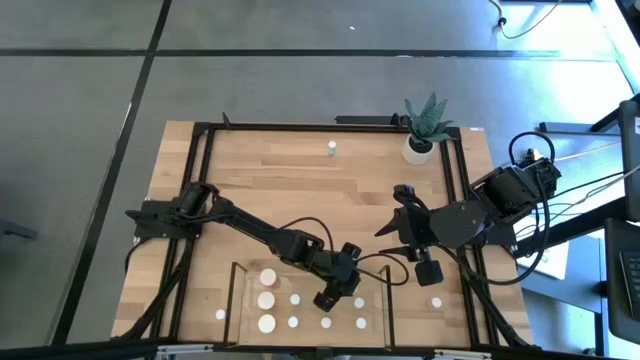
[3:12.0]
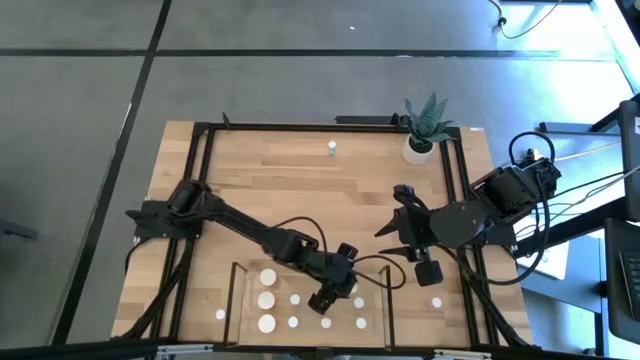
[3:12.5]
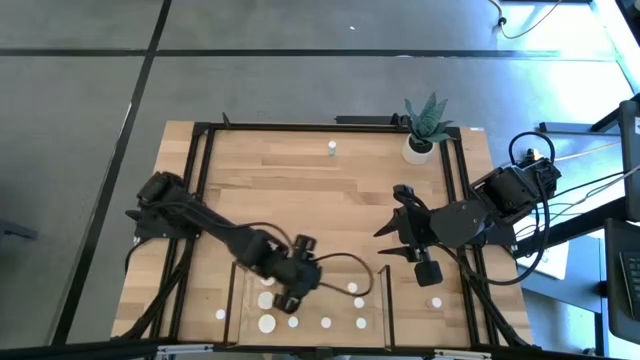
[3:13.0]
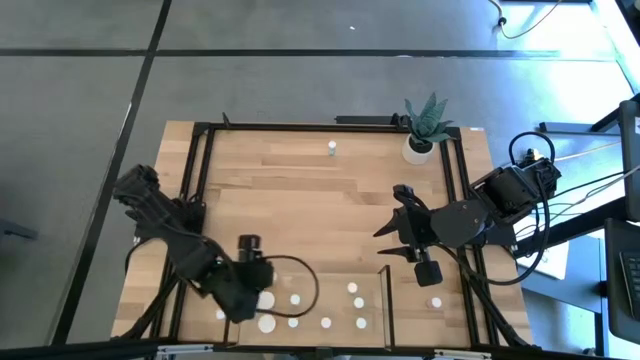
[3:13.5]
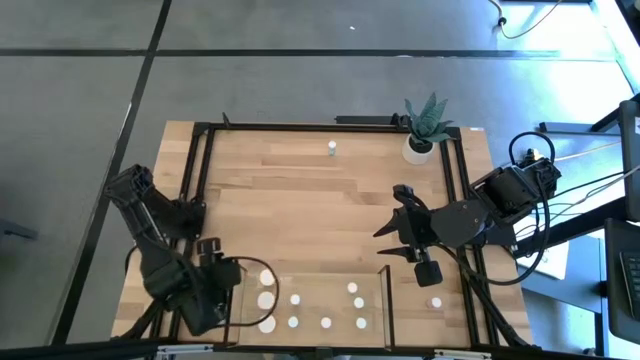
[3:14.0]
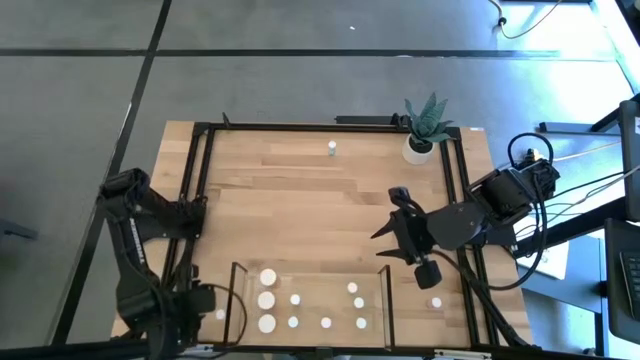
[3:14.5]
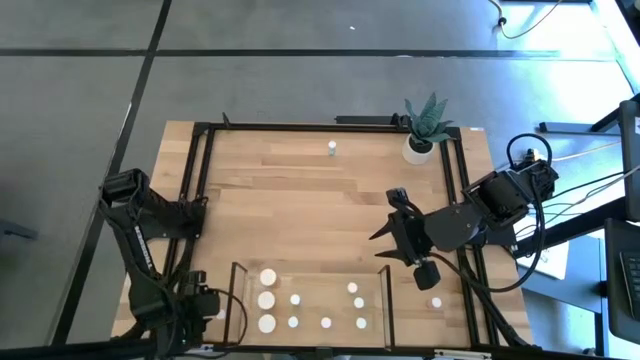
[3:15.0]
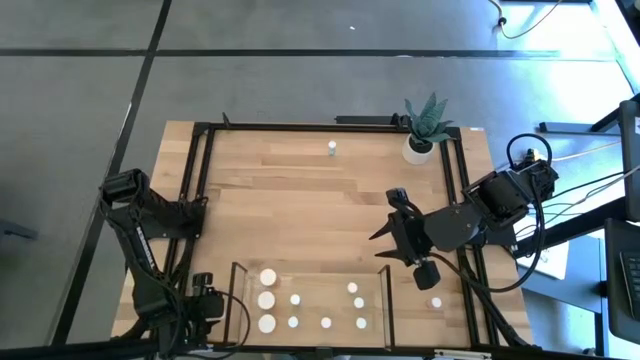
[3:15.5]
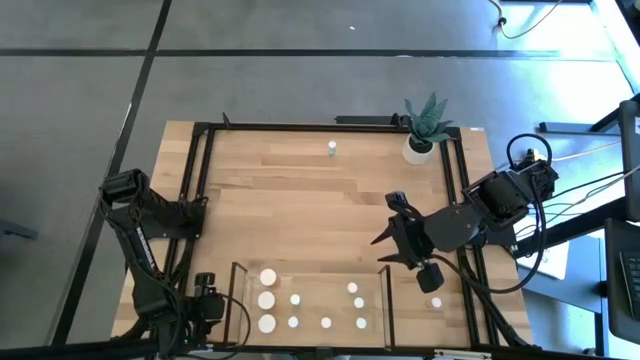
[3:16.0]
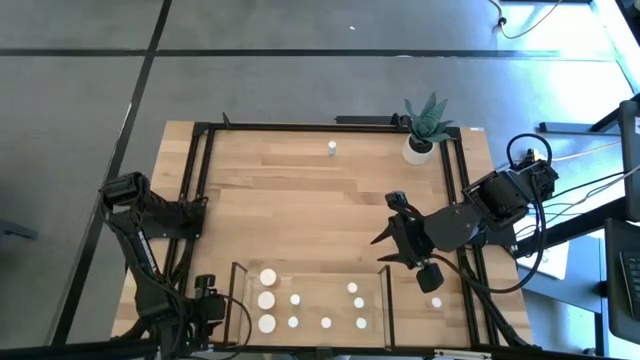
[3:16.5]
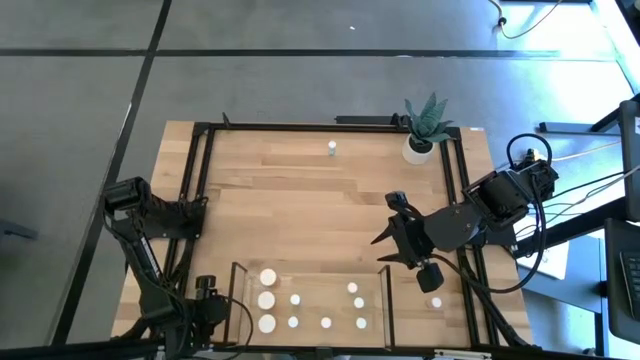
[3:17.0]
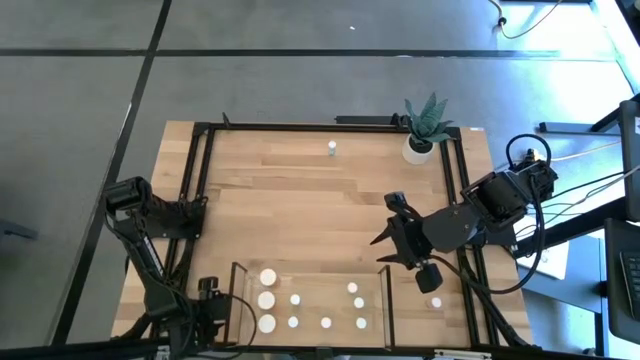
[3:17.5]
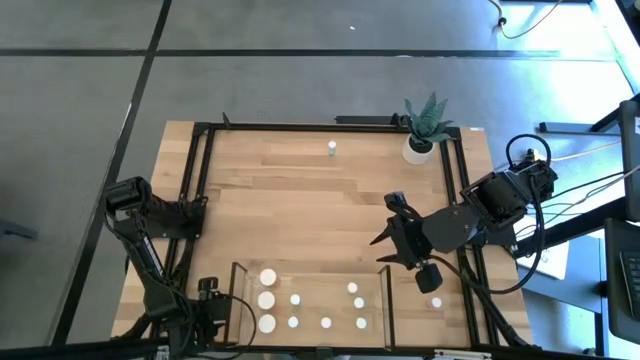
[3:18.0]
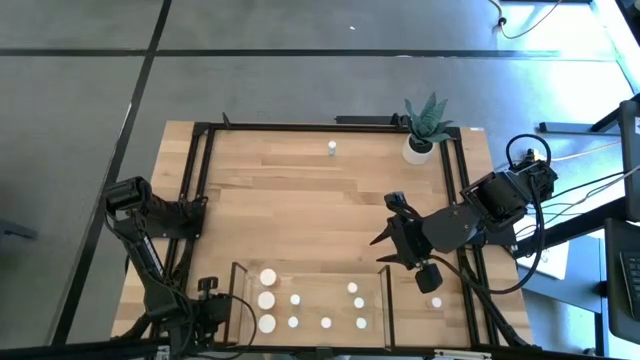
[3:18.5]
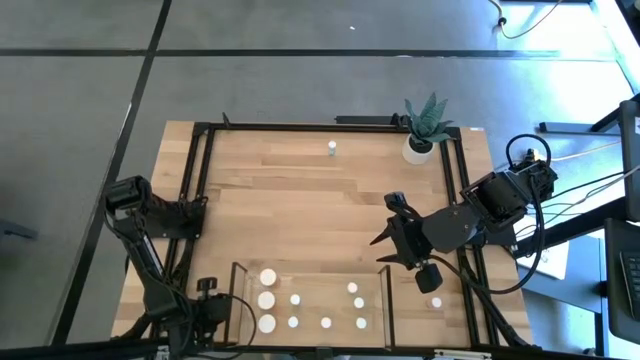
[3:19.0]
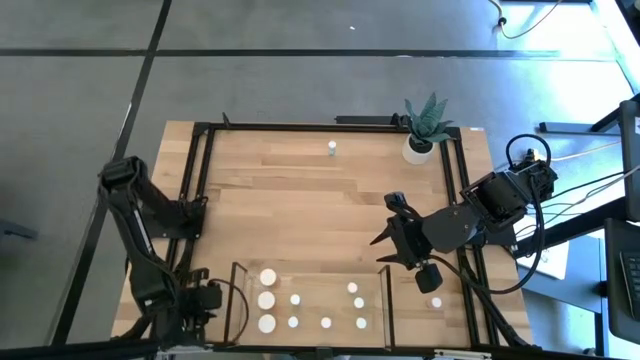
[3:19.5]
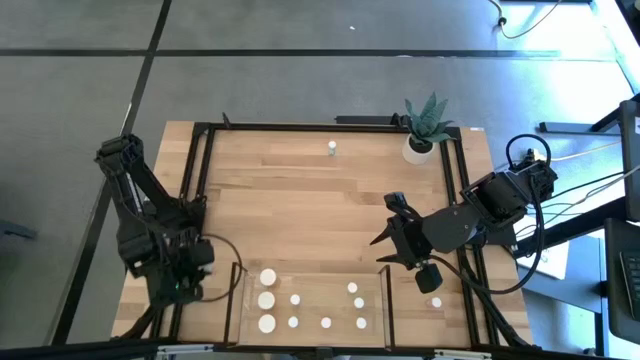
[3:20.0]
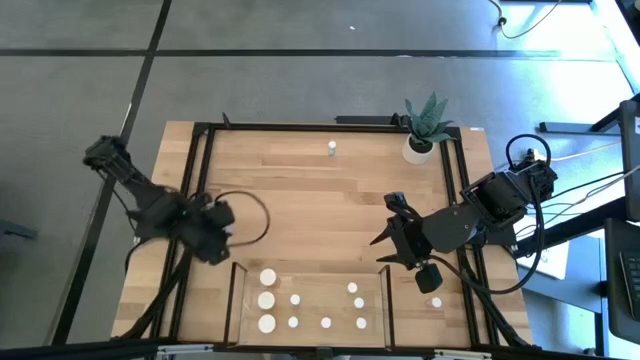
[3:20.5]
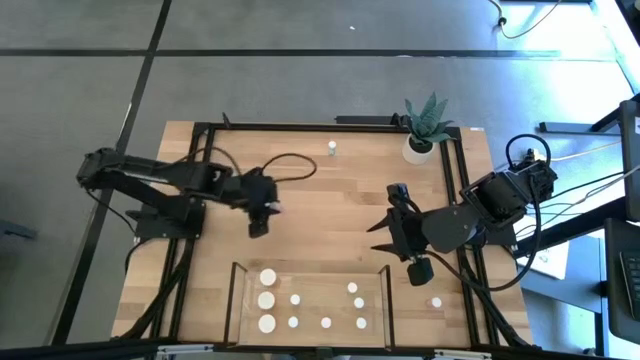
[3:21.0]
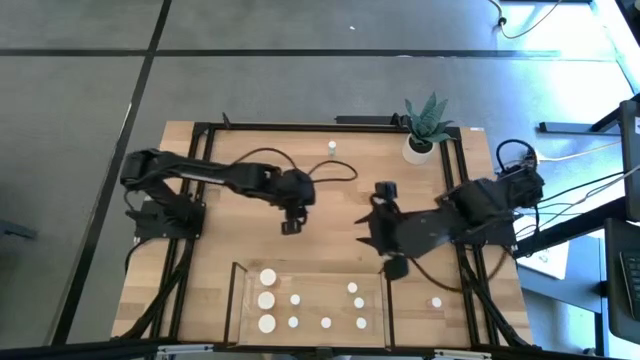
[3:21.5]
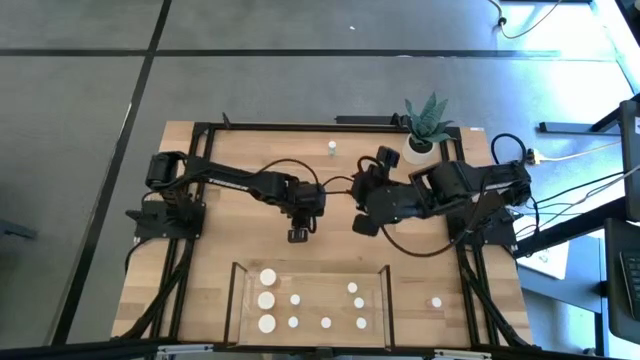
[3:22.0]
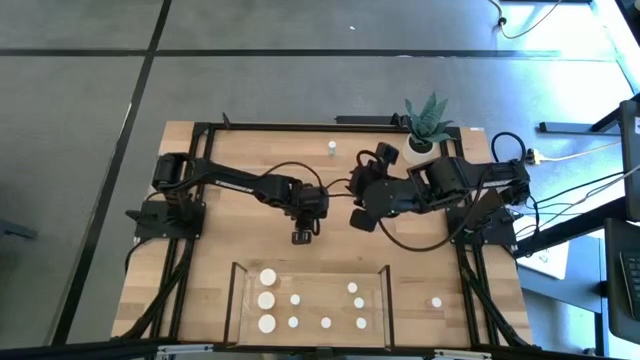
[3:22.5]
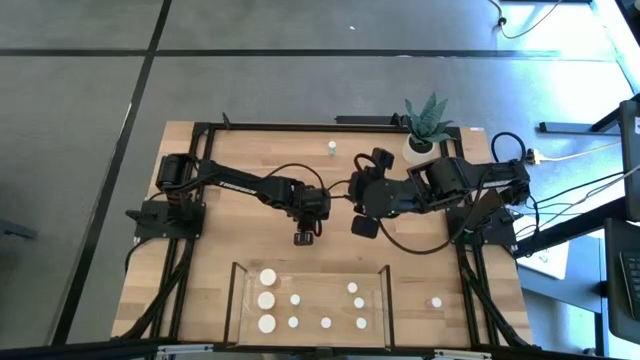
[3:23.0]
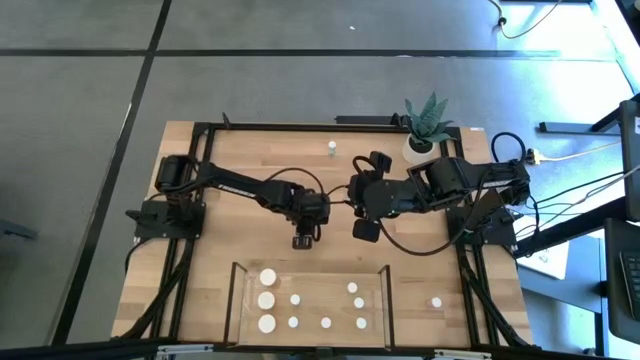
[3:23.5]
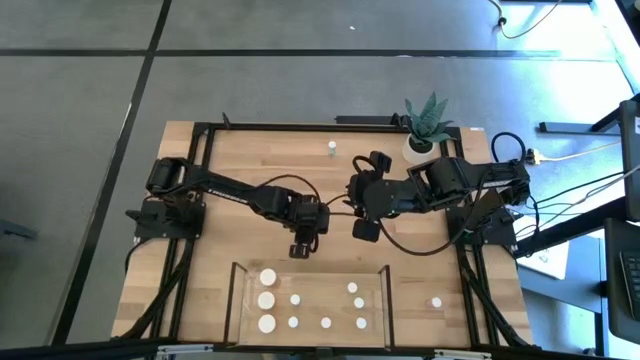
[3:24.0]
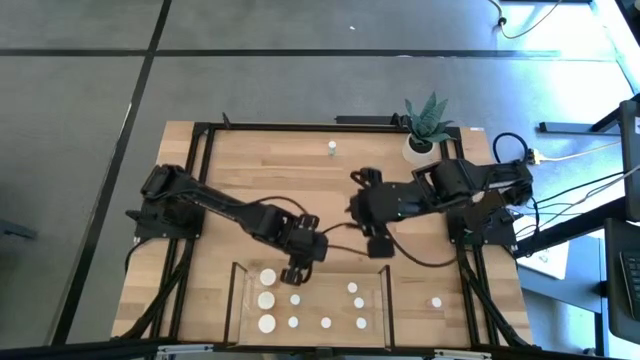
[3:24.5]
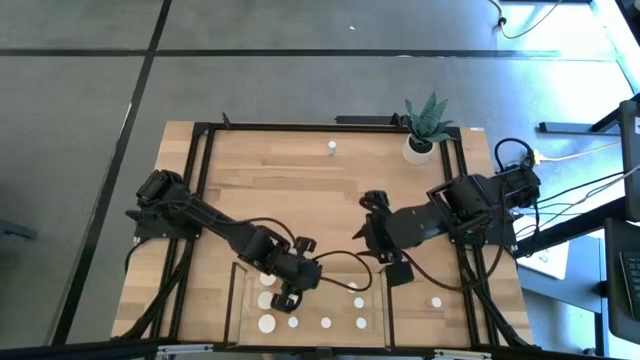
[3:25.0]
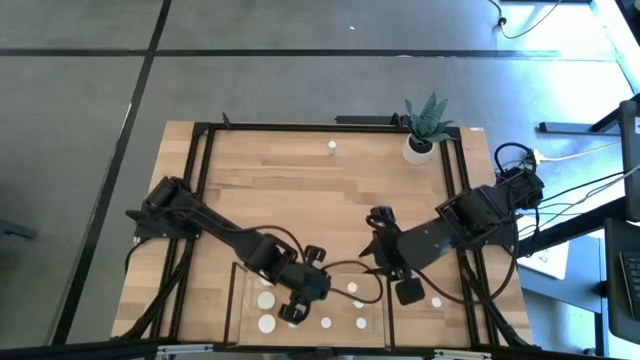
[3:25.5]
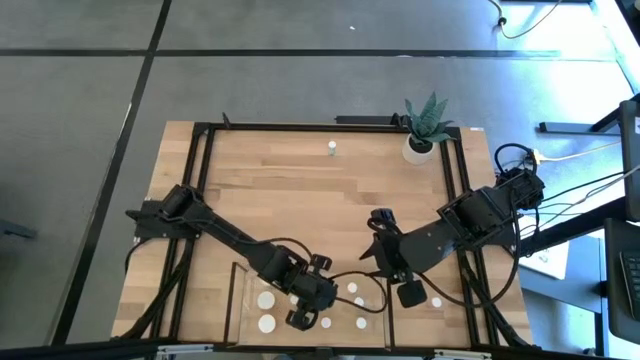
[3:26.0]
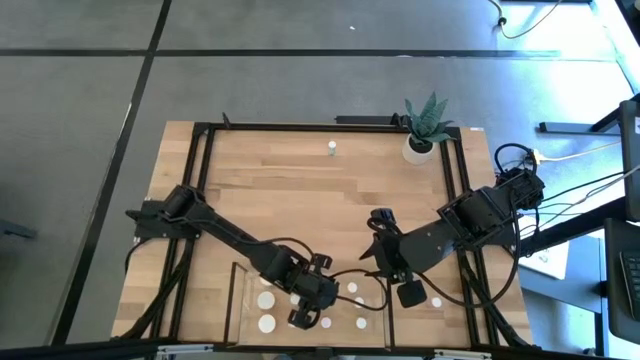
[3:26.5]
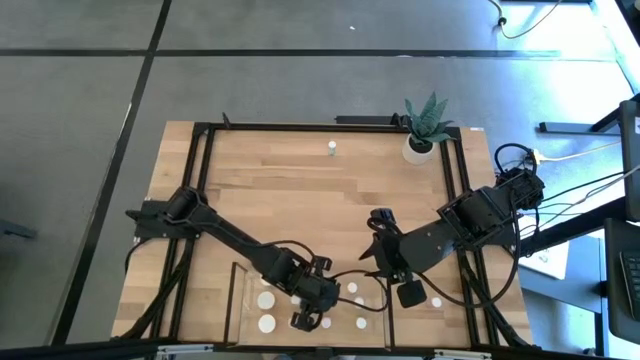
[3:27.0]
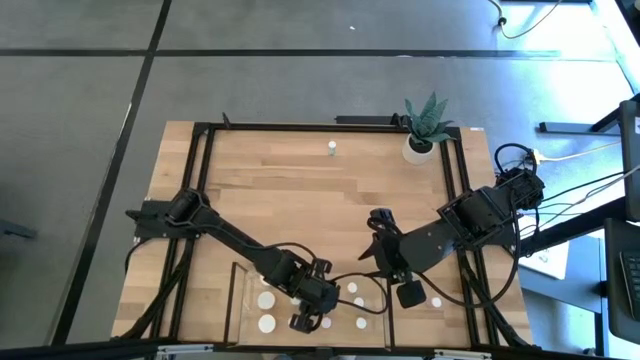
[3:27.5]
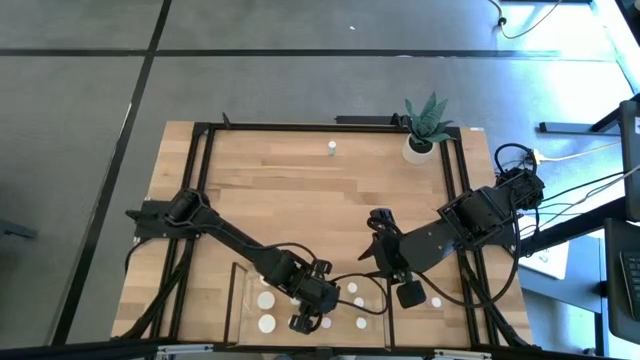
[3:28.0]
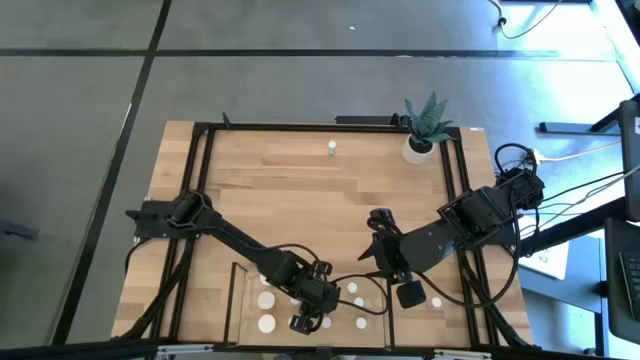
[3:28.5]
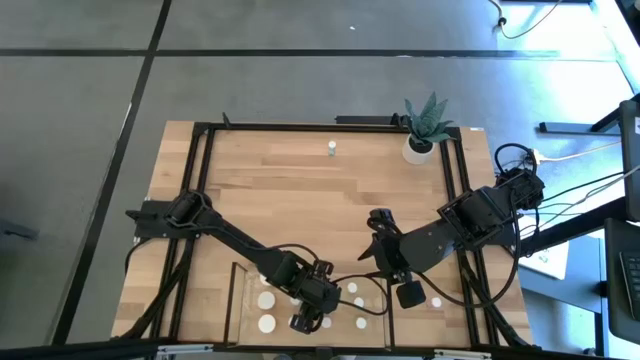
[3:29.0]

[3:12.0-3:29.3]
Task: Pick and place medicine bottles onto shelf by color
Put the left pink pill bottle on the shelf aligned with the other pink pill bottle

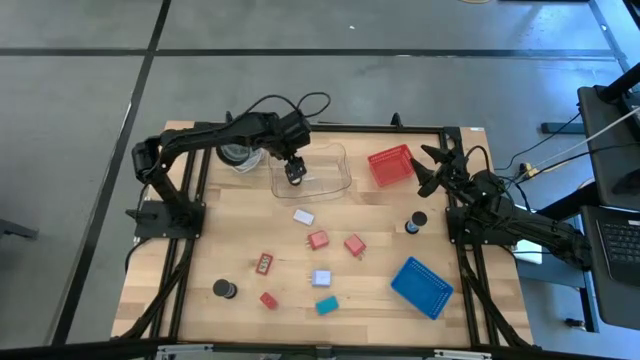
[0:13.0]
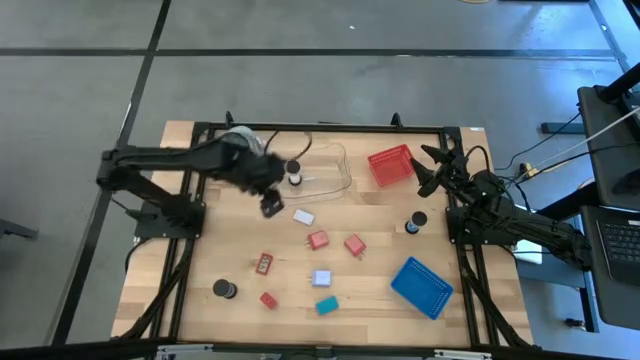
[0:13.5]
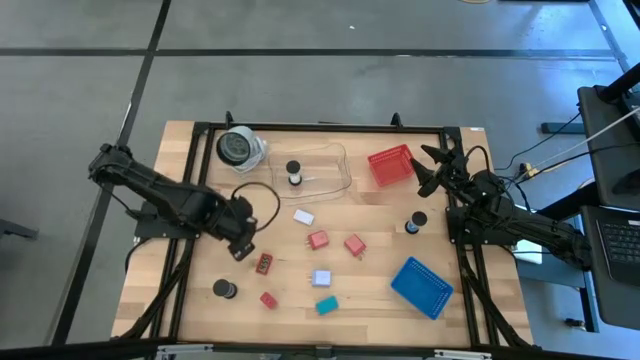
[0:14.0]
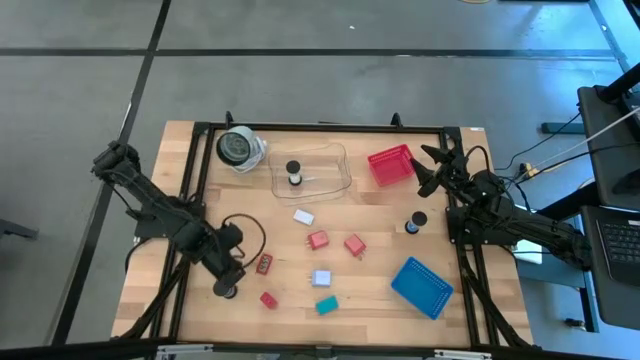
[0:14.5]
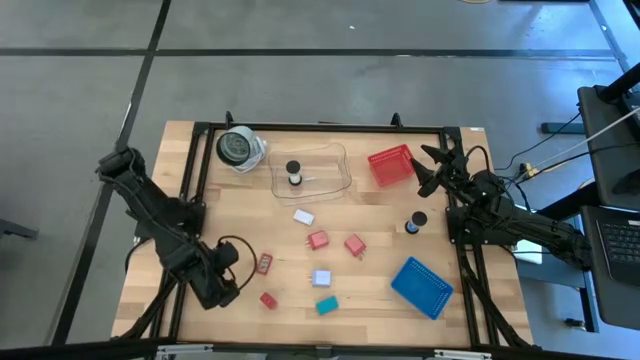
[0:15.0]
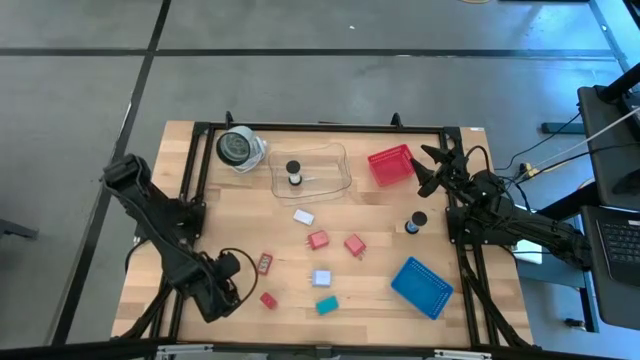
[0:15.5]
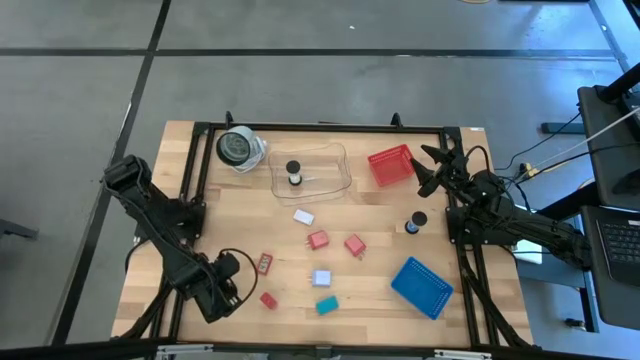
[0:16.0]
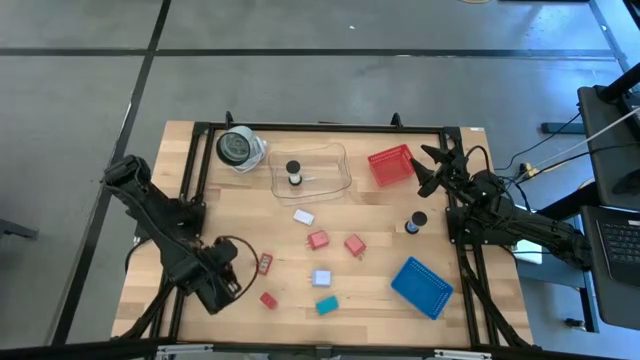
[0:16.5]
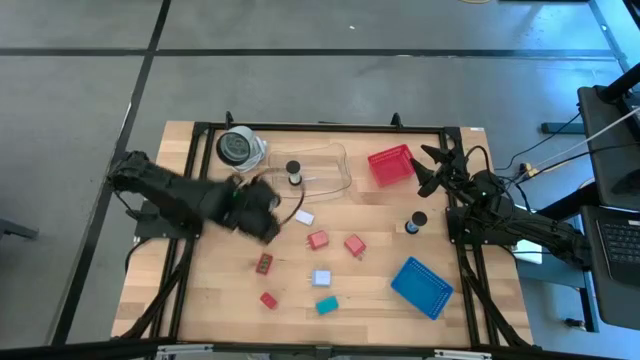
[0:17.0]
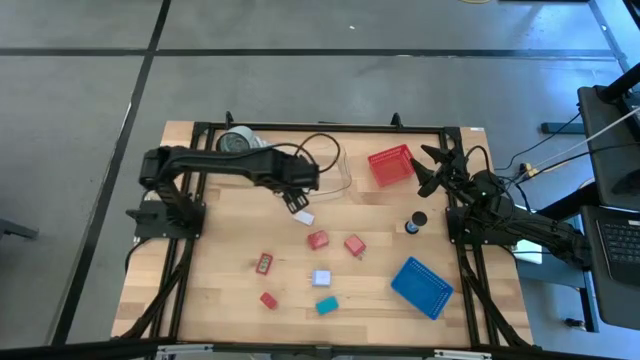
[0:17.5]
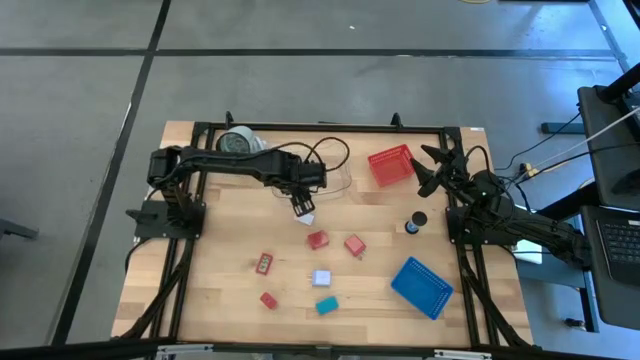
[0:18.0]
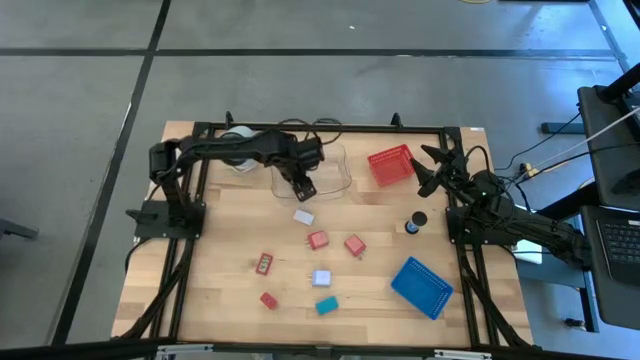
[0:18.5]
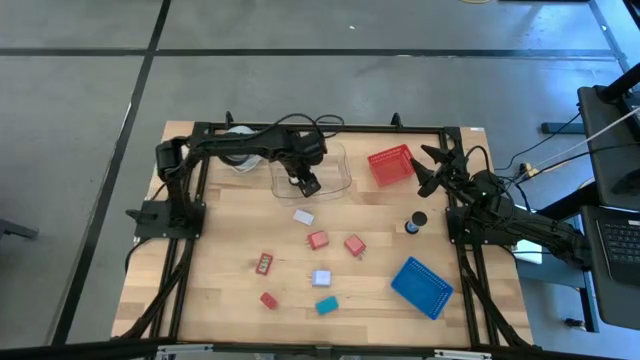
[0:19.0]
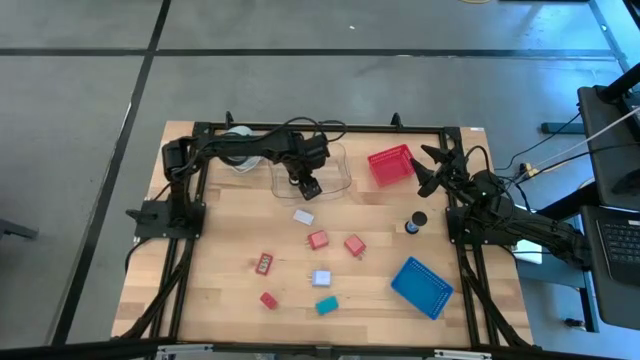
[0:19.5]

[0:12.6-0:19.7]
Task: Pick & Place Office items
Put the blue hourglass into the transparent bin
